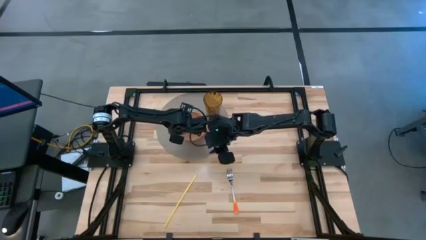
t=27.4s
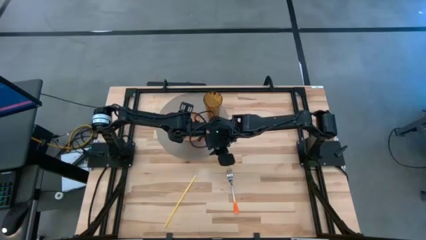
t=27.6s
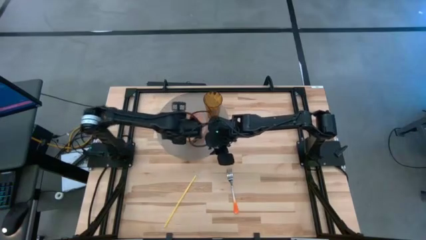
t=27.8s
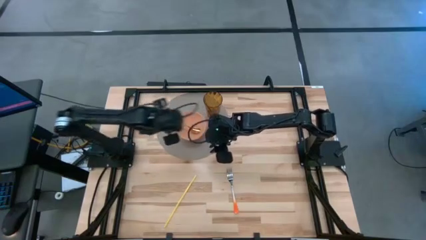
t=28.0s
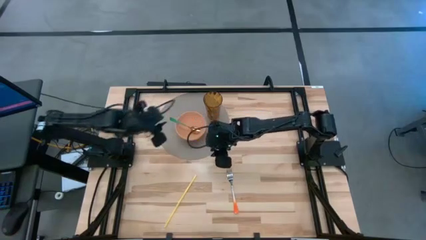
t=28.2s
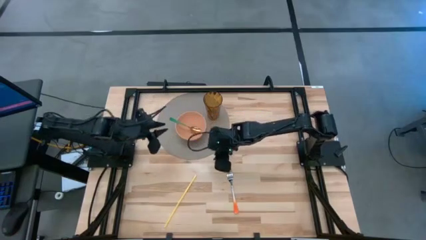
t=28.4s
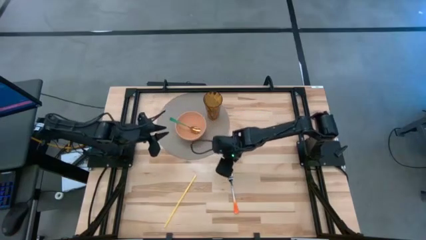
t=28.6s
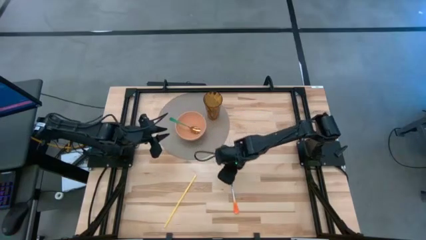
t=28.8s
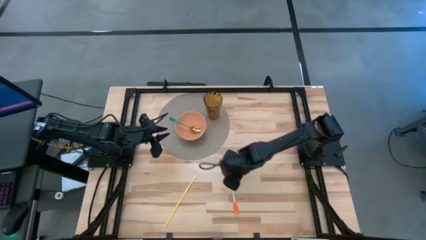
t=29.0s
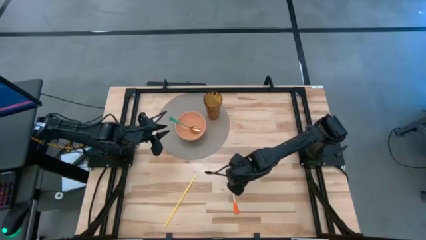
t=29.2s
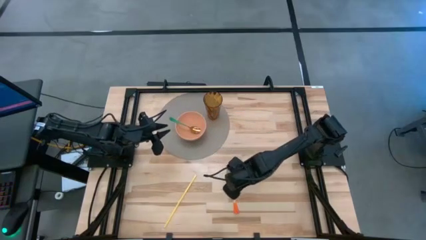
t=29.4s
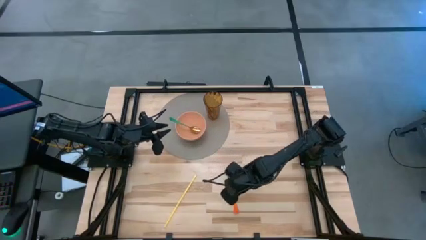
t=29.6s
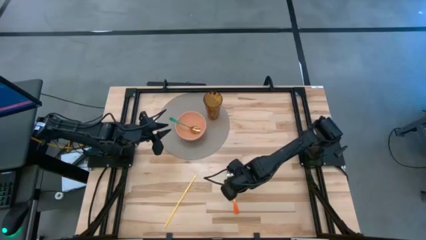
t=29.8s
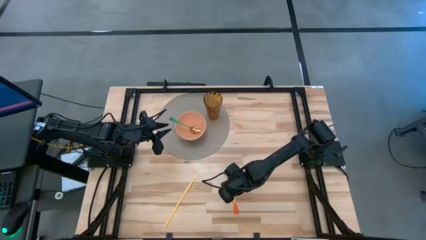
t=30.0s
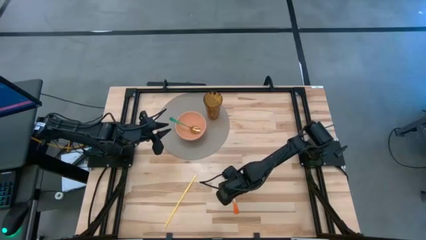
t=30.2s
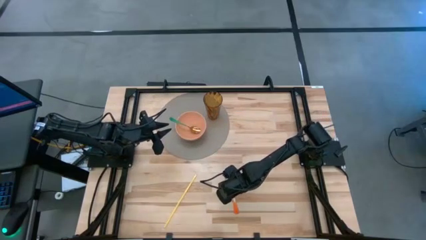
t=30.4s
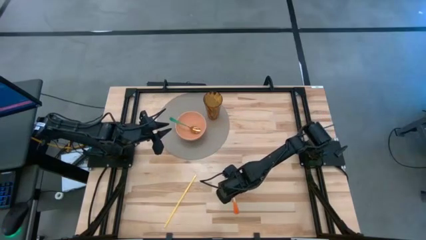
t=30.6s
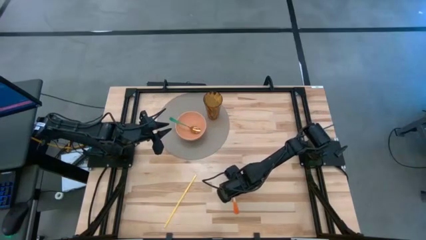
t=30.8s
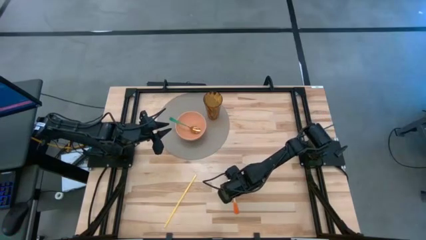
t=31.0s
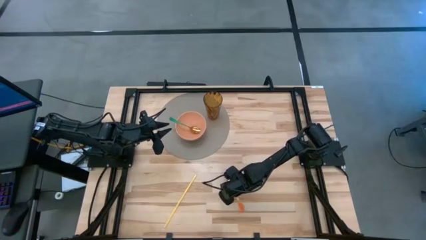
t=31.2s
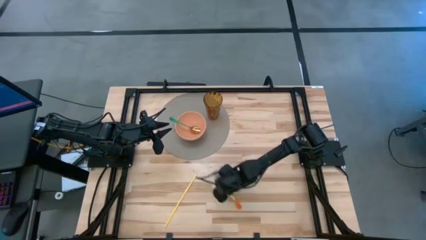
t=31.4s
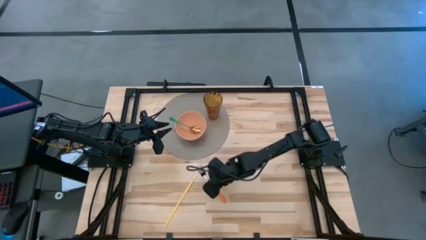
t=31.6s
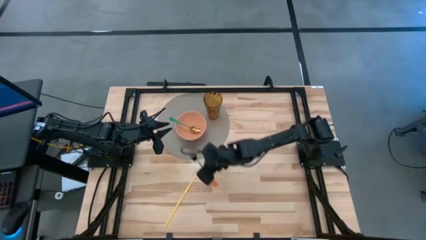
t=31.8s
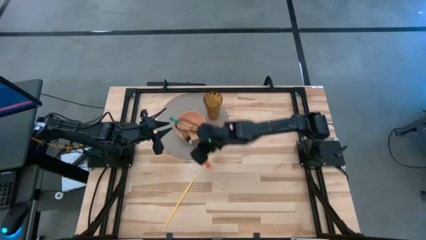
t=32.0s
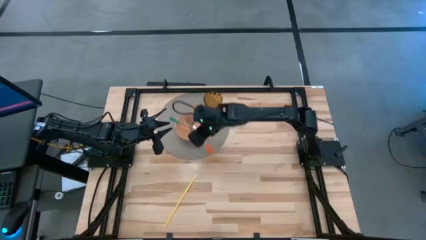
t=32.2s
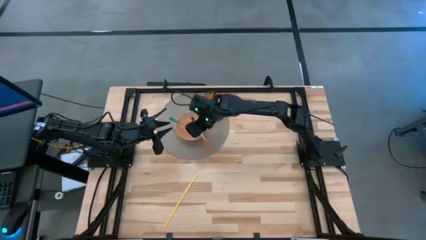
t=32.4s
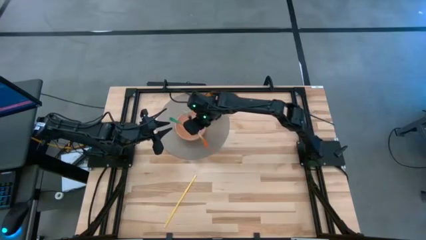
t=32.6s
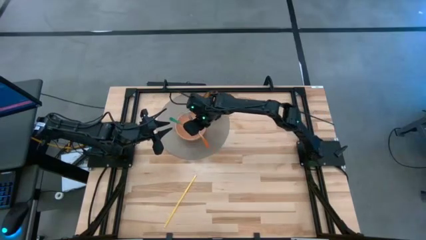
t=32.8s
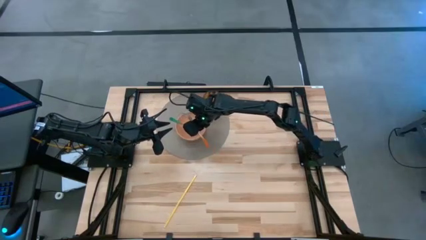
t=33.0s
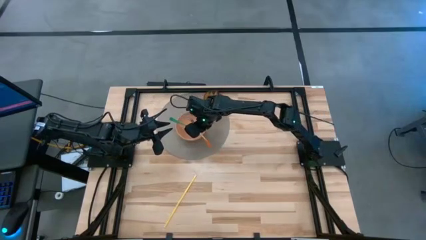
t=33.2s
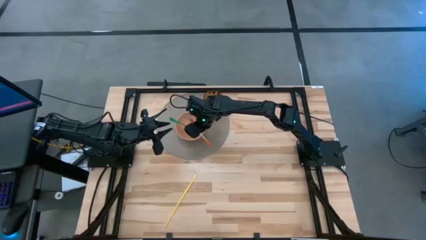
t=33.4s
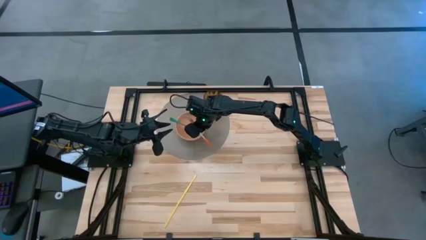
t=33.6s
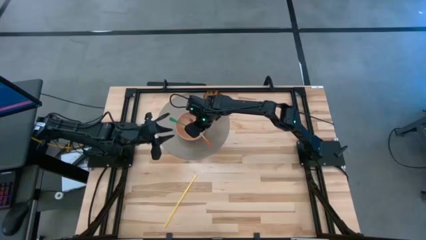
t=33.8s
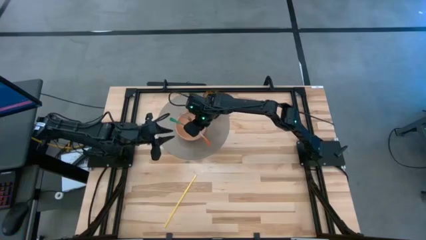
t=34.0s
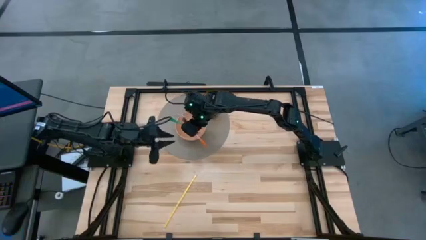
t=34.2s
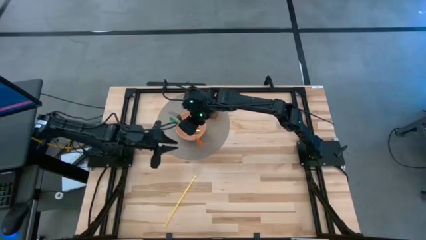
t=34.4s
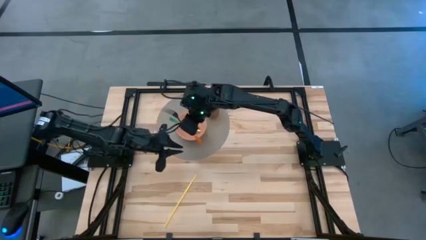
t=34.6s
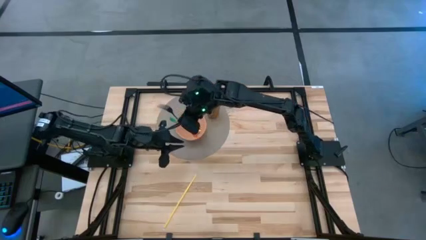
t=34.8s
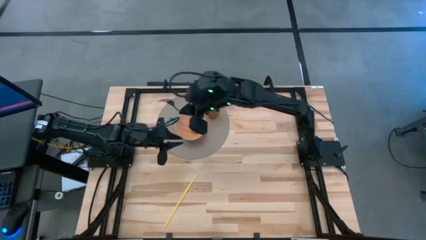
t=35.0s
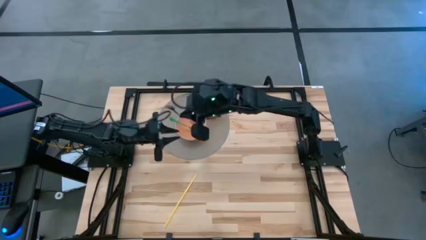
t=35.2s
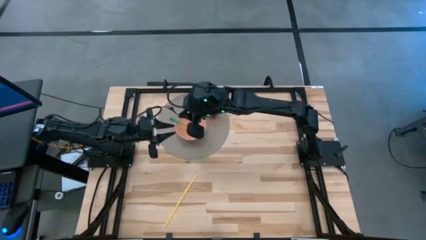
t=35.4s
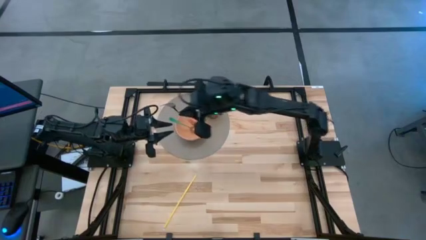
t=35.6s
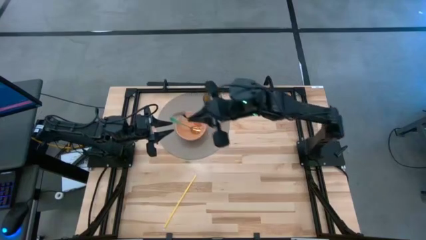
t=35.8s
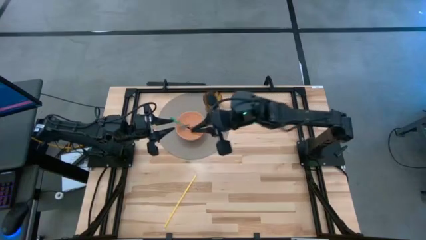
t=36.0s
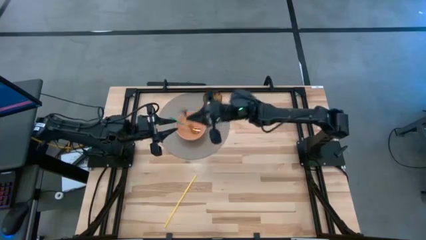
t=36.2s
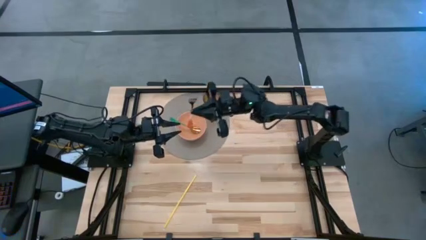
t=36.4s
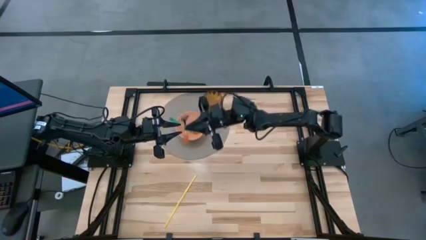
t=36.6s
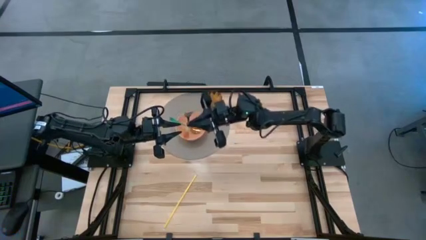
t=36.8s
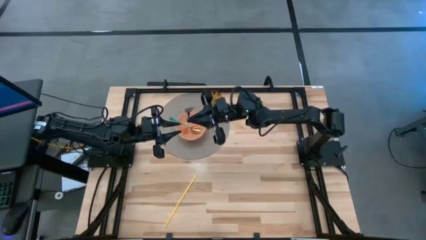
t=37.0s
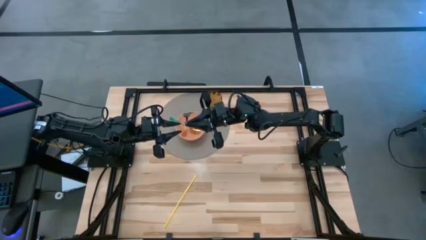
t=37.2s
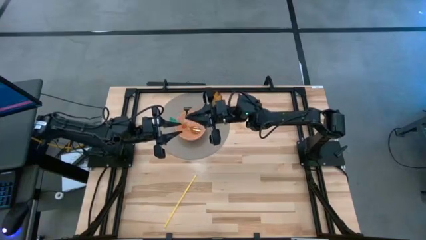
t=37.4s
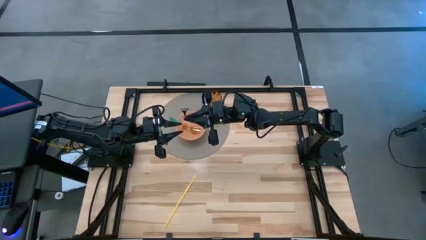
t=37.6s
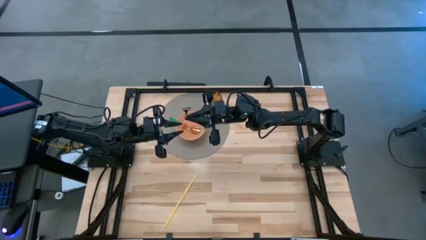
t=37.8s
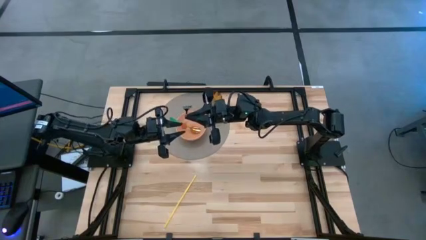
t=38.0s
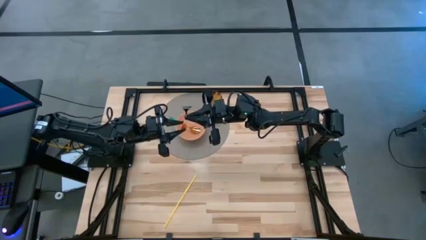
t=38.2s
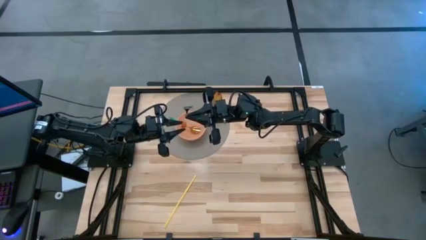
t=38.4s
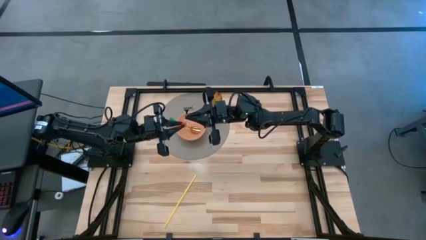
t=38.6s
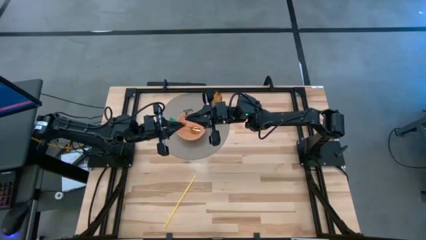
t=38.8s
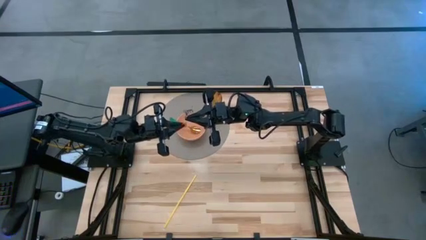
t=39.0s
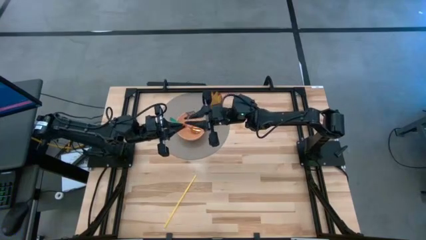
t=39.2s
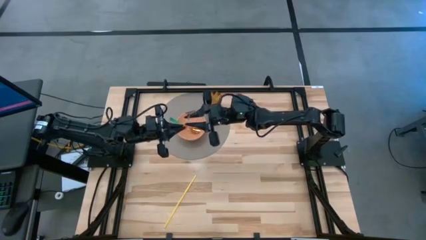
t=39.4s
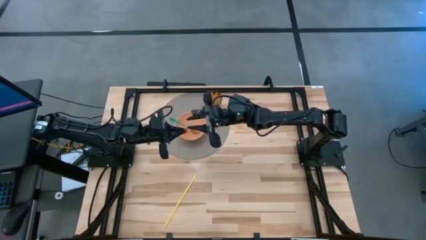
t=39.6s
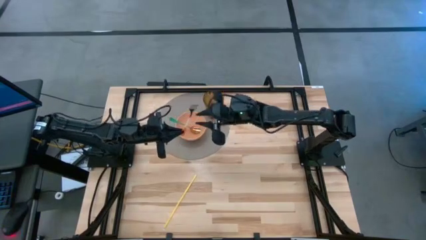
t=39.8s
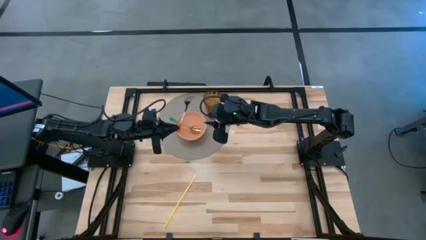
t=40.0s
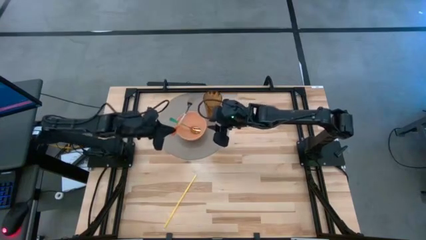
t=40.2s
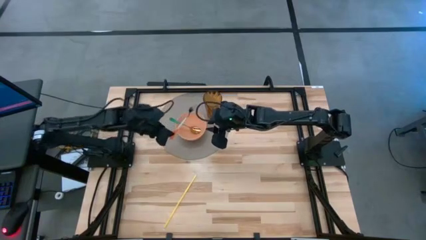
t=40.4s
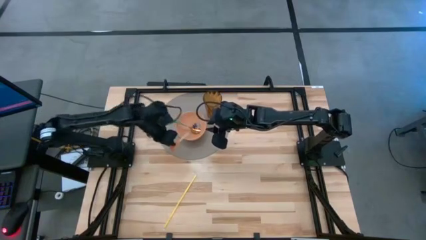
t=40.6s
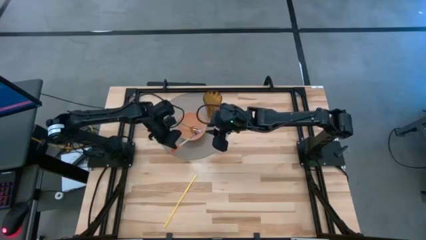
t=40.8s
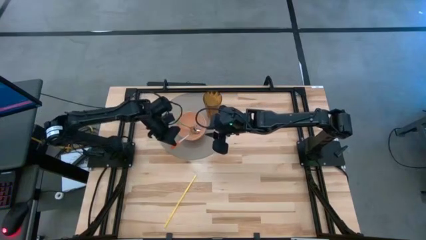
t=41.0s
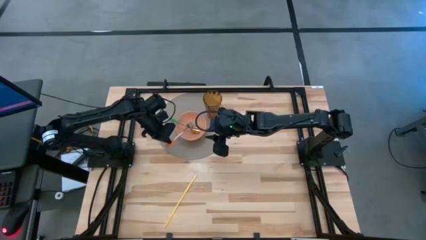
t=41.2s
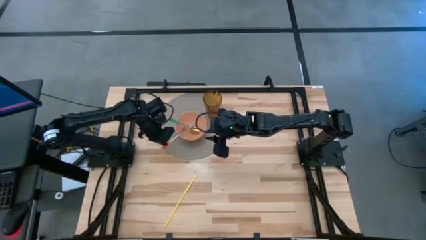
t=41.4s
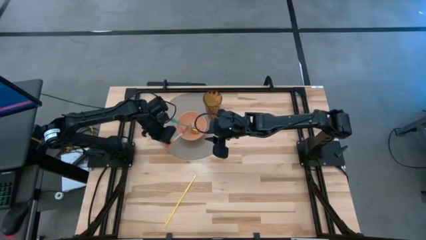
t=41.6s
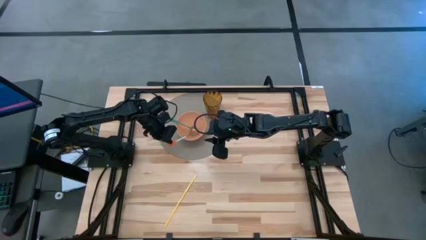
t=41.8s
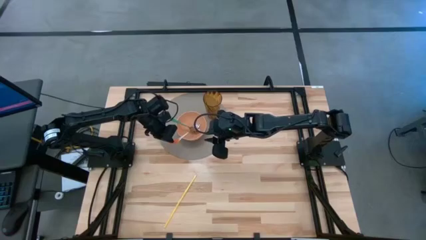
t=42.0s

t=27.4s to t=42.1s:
Task: Pick & Place Utensil
Put the orange fork into the bowl on the gray mat
